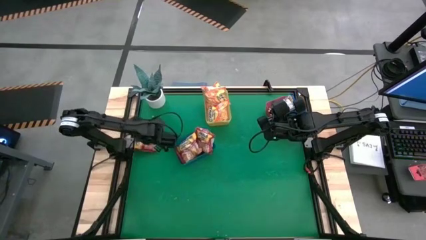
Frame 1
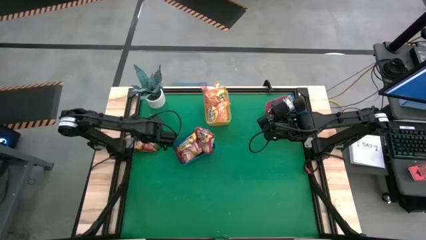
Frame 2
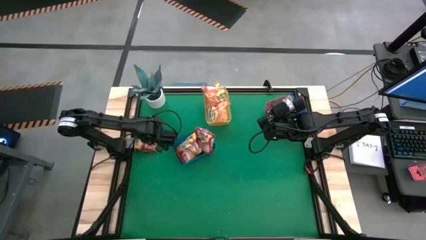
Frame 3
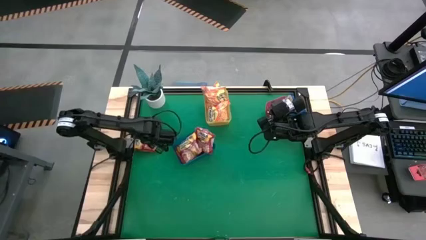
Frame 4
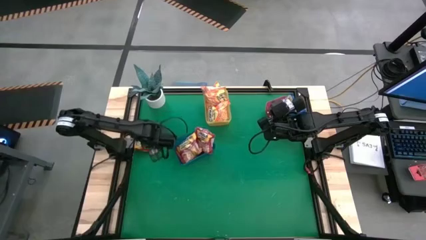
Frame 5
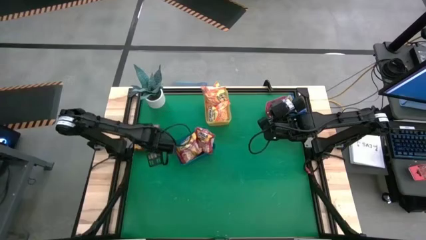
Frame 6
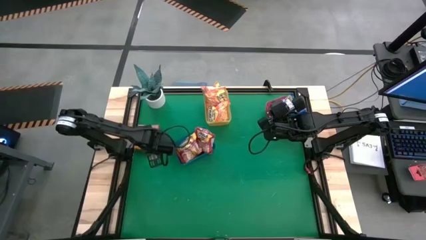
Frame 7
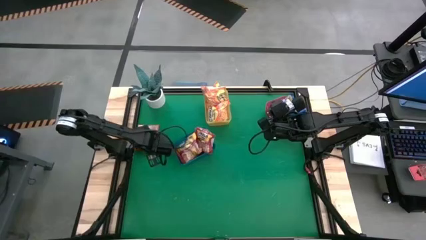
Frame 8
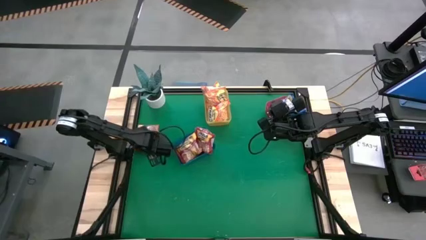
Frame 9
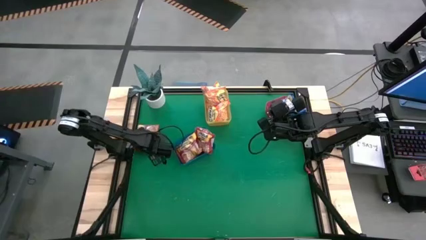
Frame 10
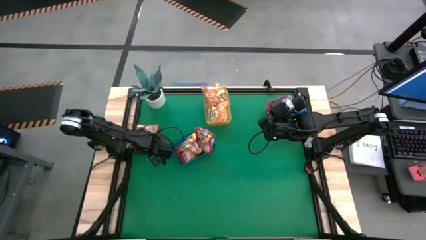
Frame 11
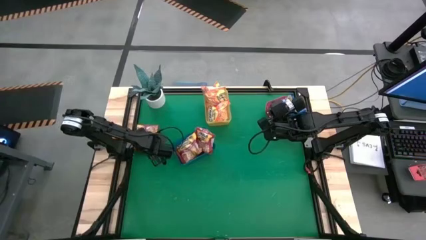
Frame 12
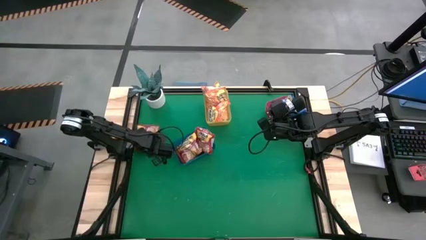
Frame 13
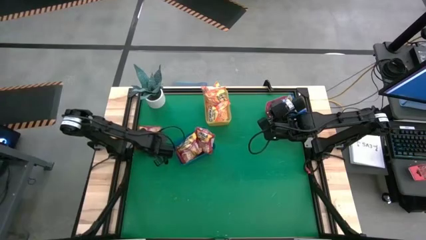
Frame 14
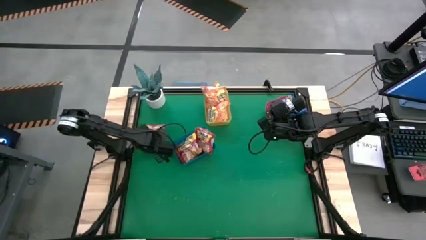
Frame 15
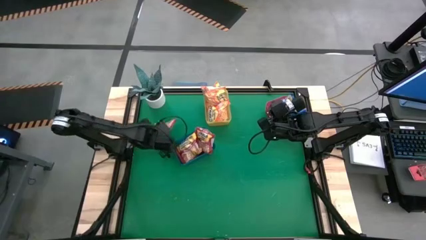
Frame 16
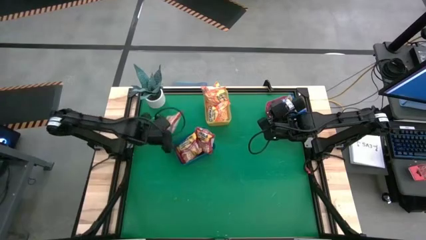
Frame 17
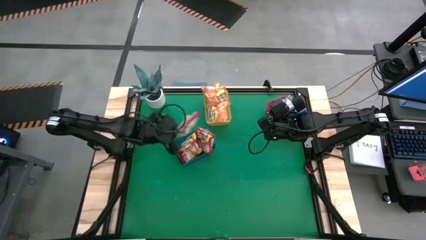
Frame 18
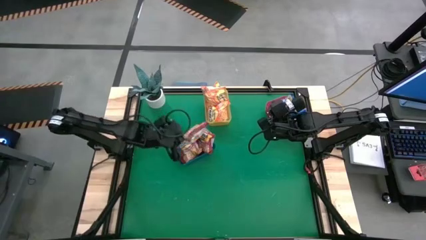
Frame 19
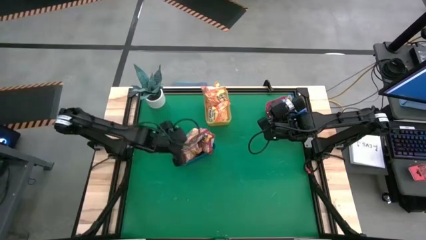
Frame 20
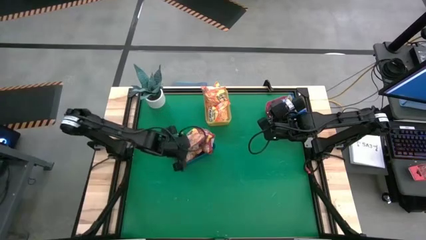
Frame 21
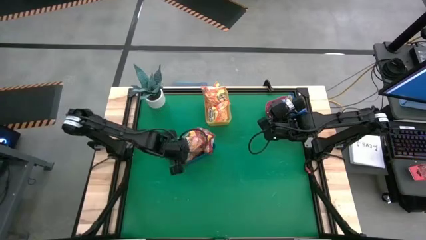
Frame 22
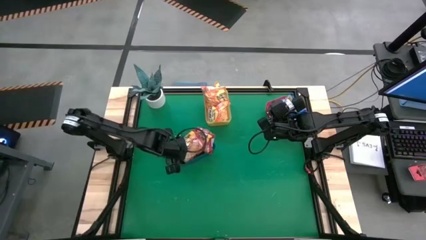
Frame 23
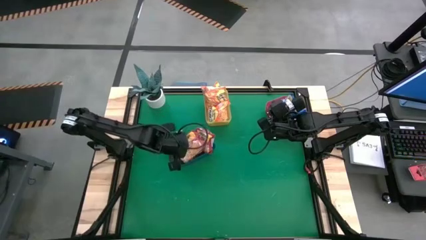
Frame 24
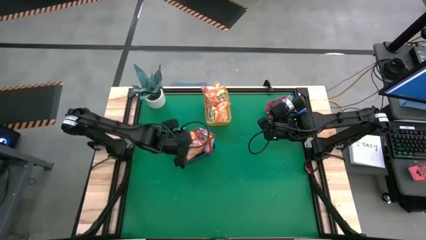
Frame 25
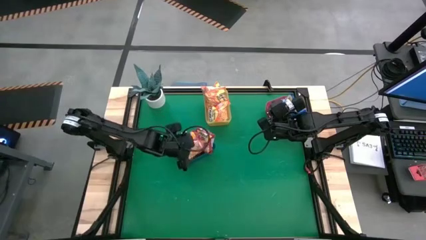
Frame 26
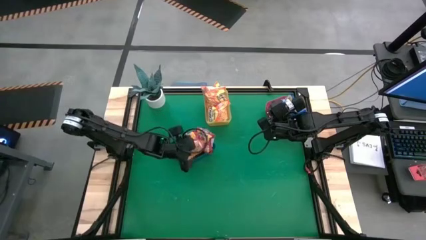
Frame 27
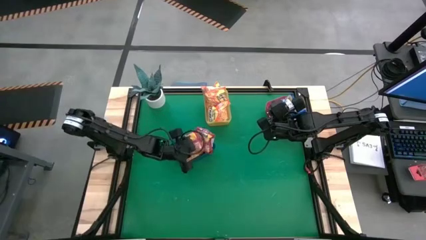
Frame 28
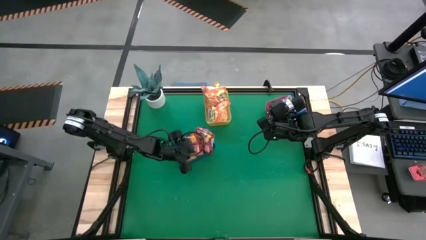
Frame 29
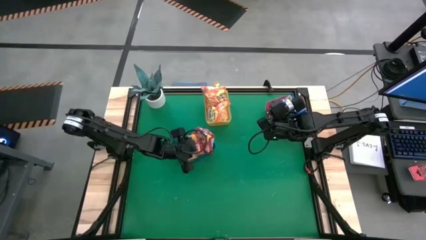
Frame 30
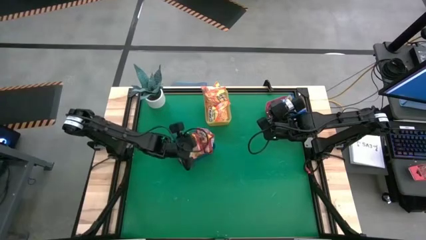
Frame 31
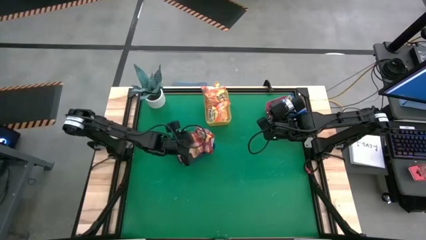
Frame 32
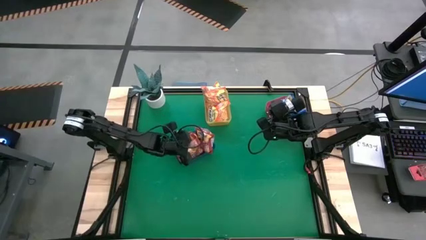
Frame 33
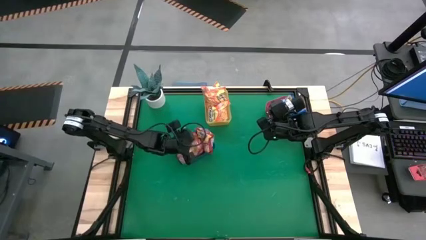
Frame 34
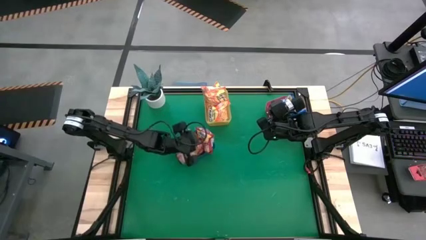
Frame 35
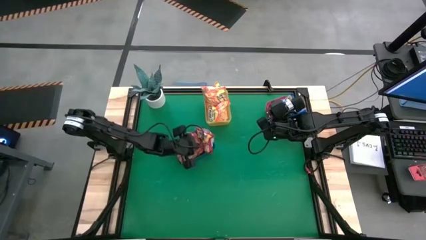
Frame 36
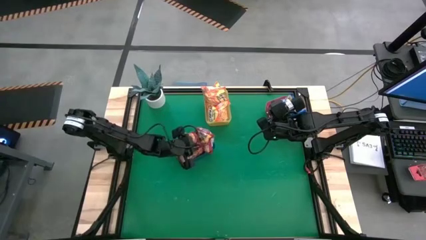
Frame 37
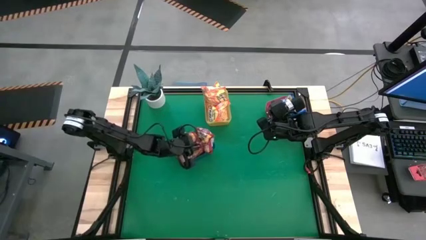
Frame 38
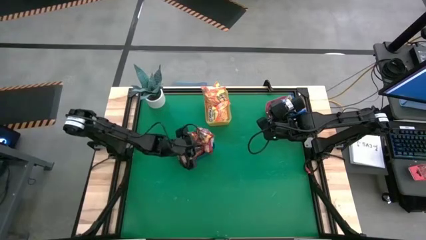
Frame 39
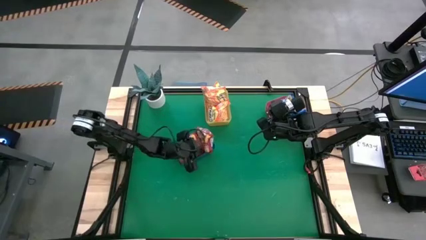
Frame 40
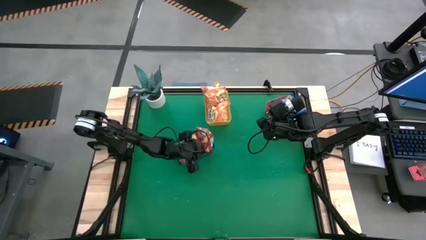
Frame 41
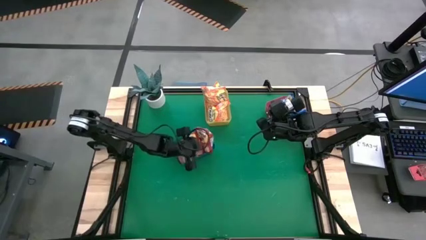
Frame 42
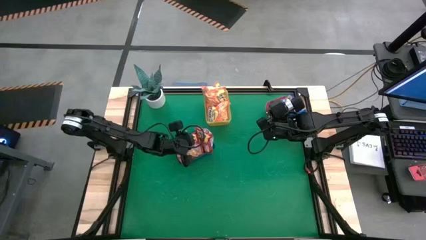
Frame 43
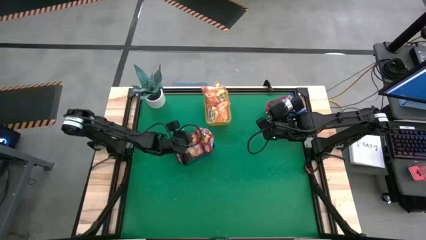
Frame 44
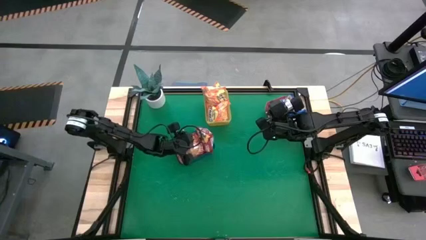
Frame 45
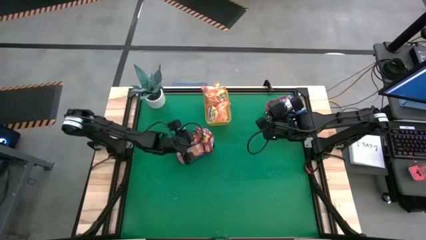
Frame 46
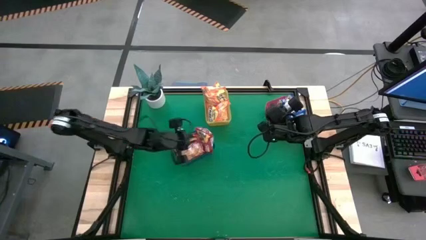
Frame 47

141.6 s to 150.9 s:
Task: Sort Maruchan noodles
Put the red noodle pack into the blue bin

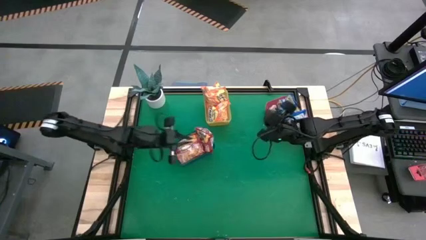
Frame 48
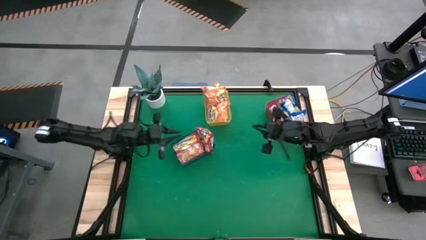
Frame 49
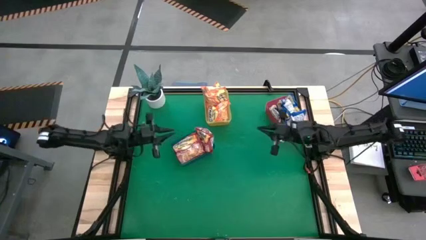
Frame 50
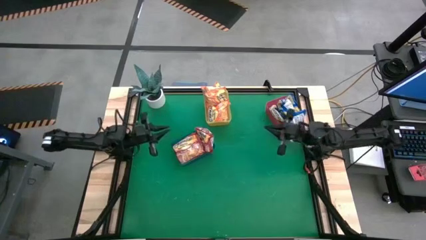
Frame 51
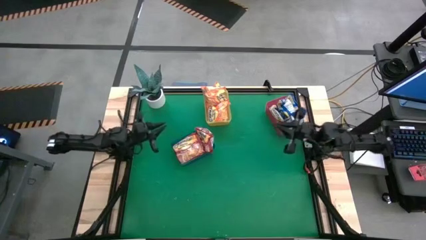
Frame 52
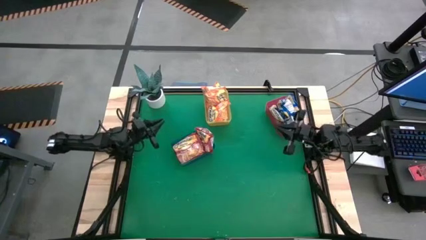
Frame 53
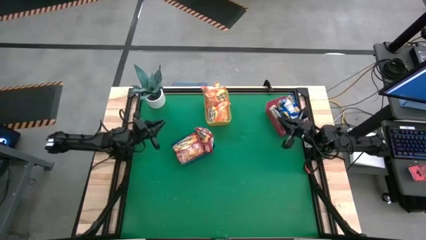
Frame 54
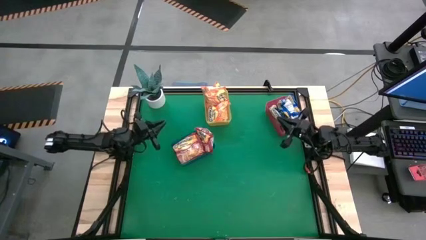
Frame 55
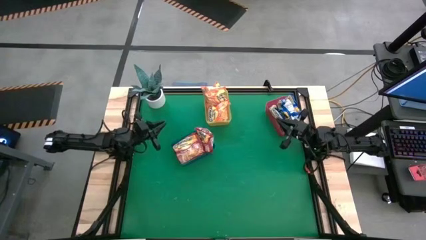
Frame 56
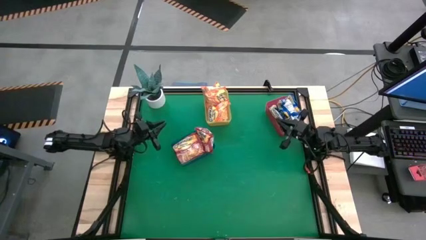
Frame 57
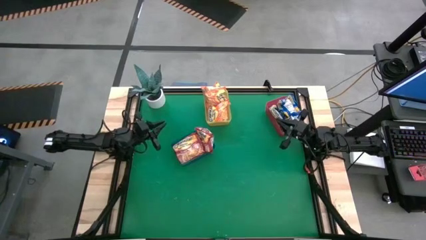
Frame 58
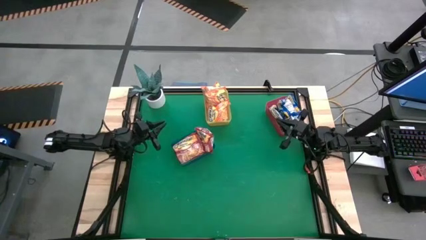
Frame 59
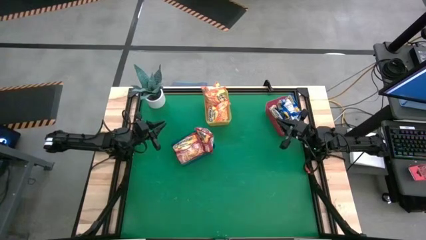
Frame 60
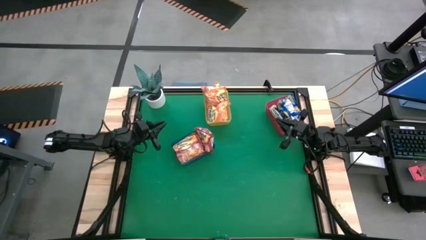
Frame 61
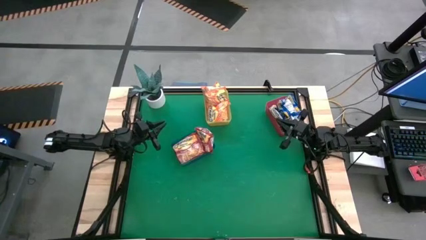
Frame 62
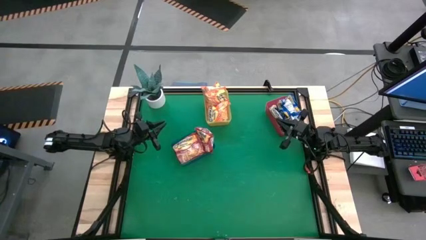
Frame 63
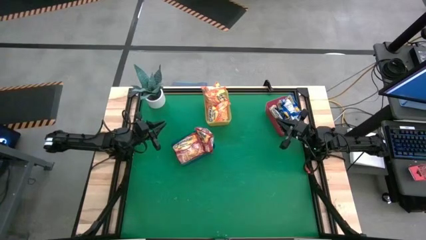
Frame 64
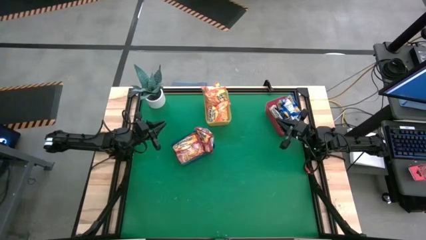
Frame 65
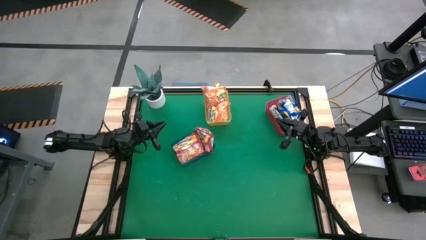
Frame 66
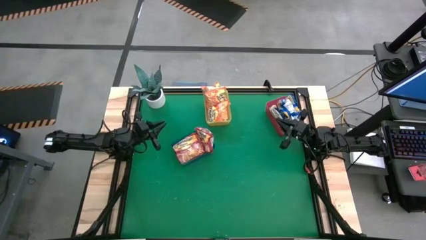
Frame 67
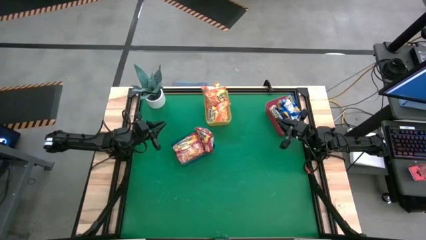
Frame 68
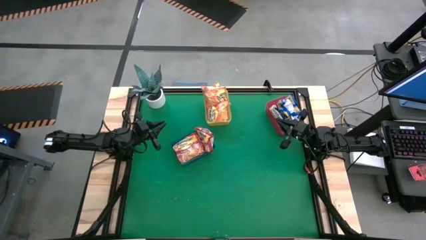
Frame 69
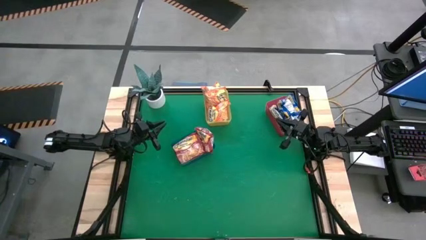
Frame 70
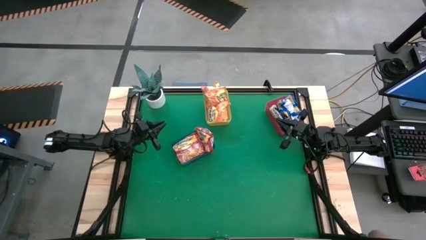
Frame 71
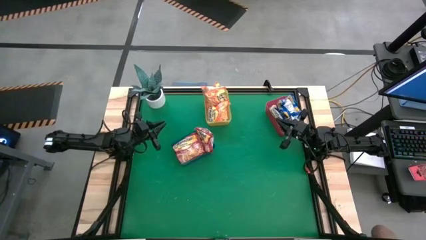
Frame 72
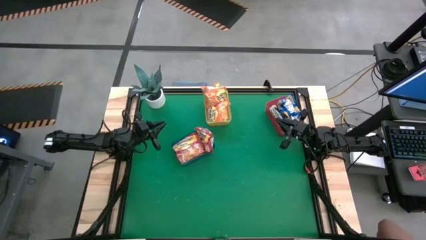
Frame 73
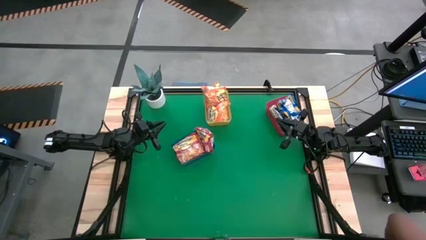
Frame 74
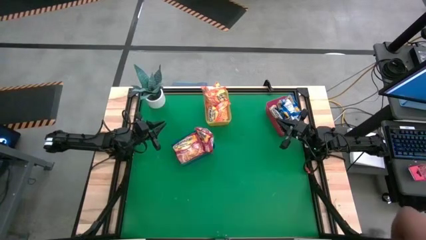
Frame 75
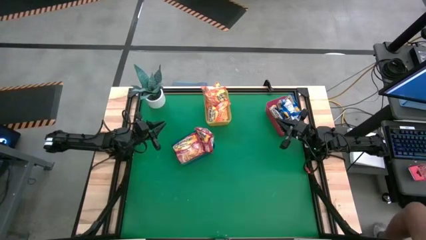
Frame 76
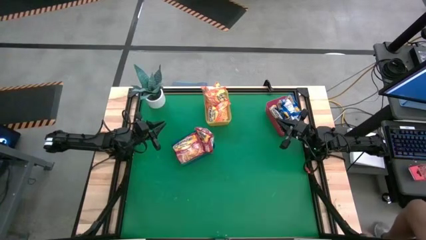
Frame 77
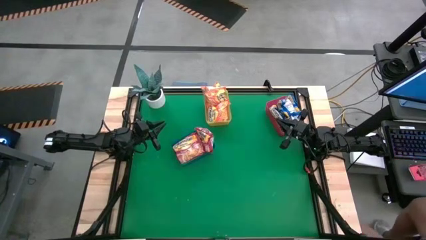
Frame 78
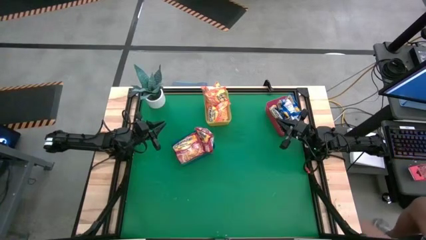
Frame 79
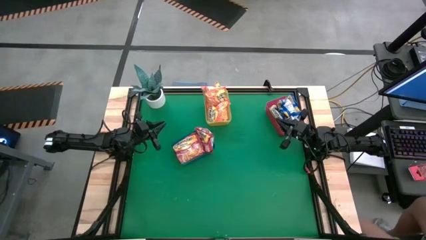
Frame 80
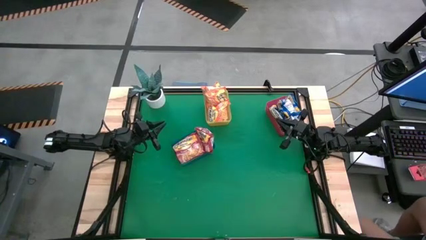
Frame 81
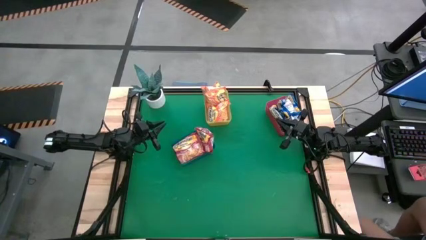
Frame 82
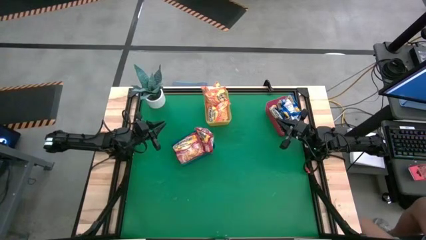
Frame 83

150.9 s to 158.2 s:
Return to Home Position
